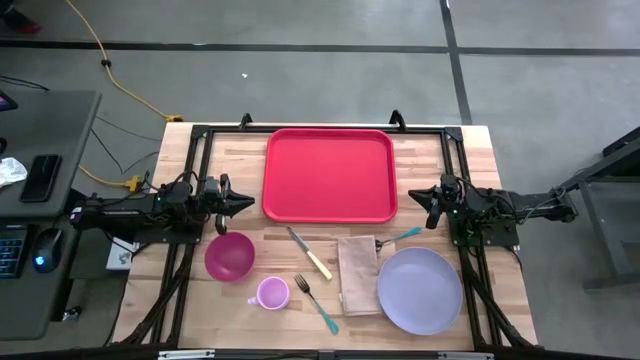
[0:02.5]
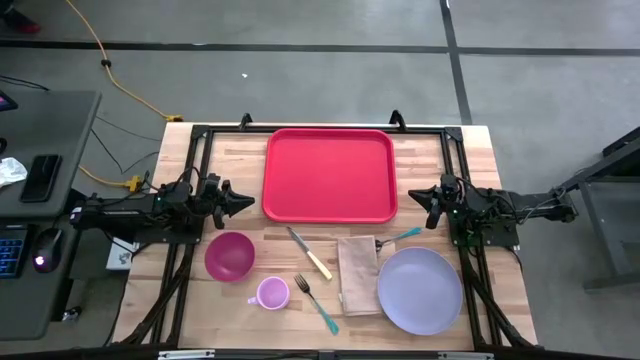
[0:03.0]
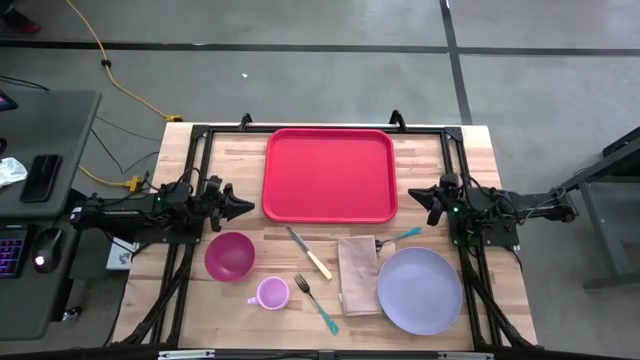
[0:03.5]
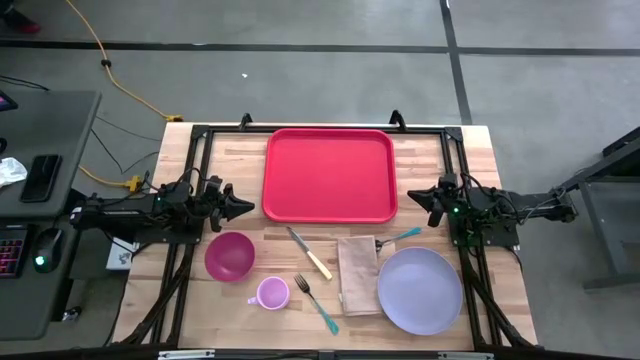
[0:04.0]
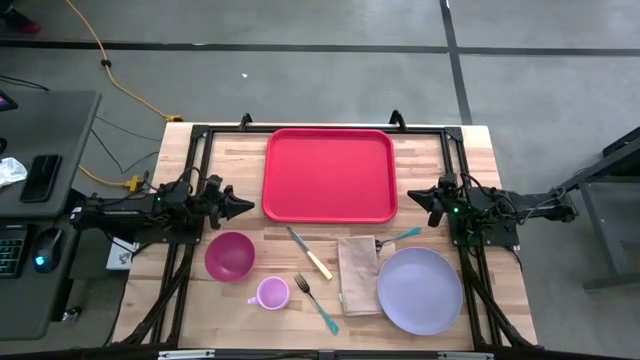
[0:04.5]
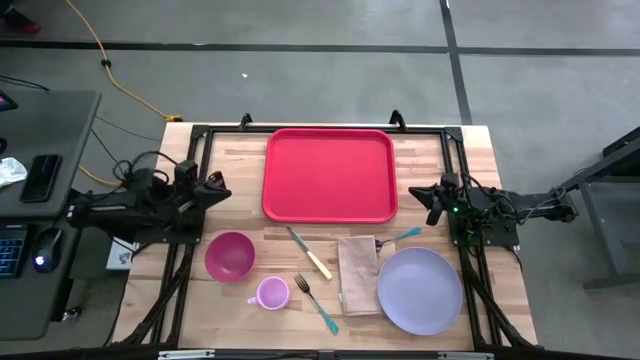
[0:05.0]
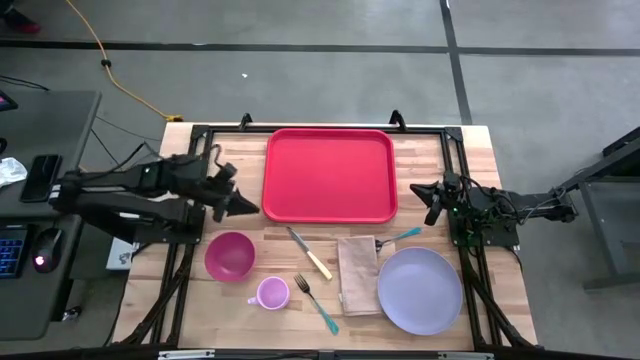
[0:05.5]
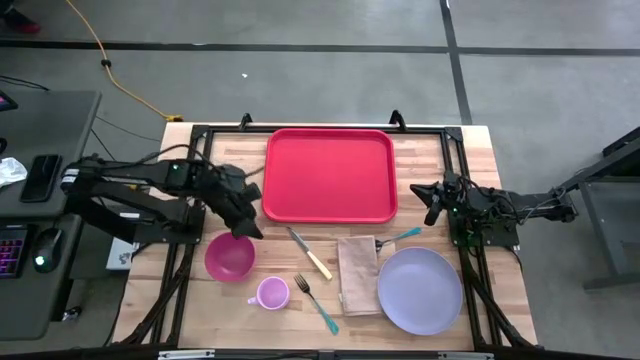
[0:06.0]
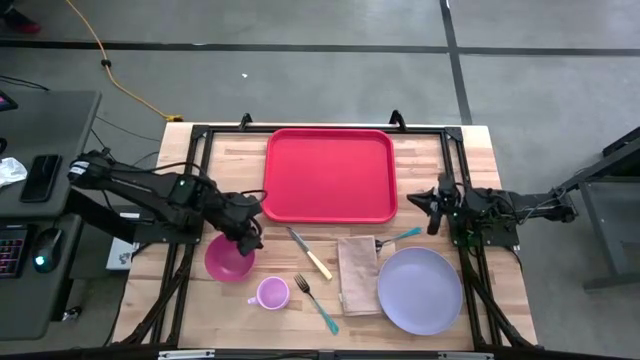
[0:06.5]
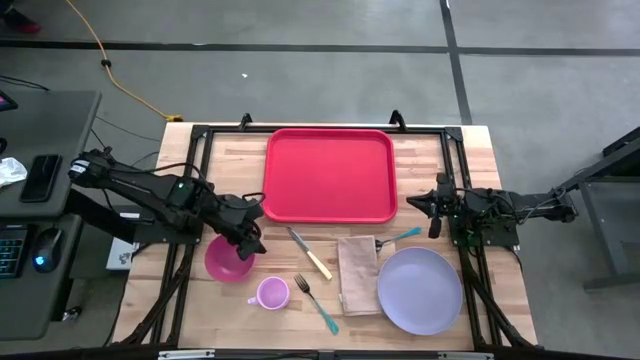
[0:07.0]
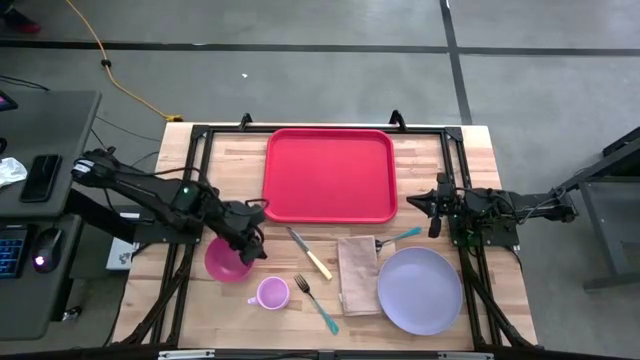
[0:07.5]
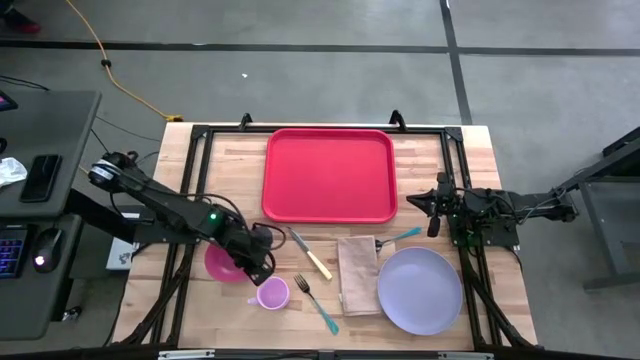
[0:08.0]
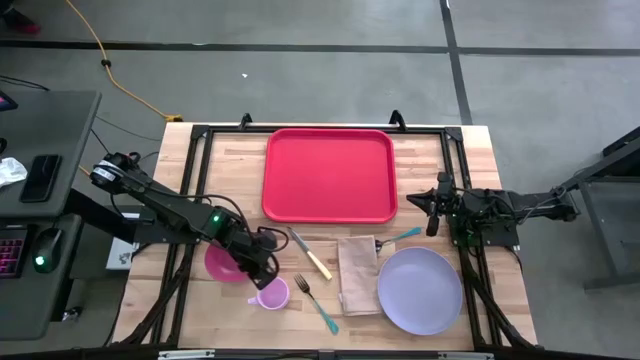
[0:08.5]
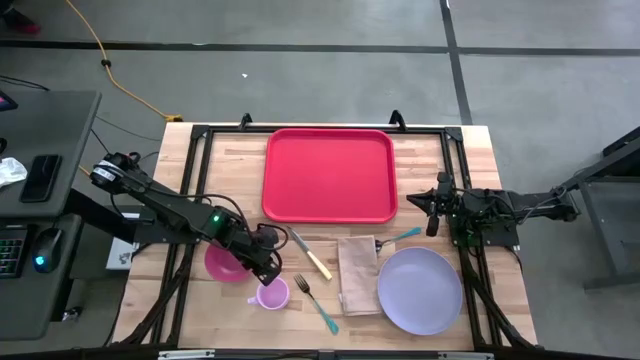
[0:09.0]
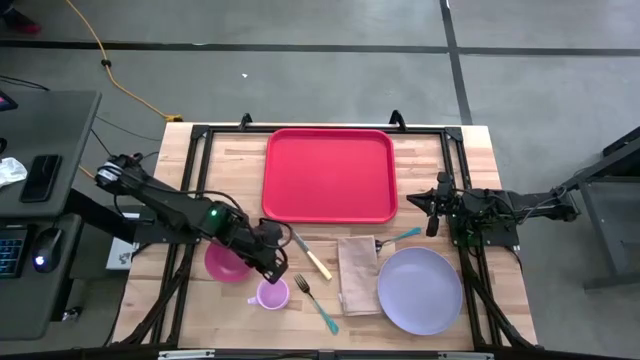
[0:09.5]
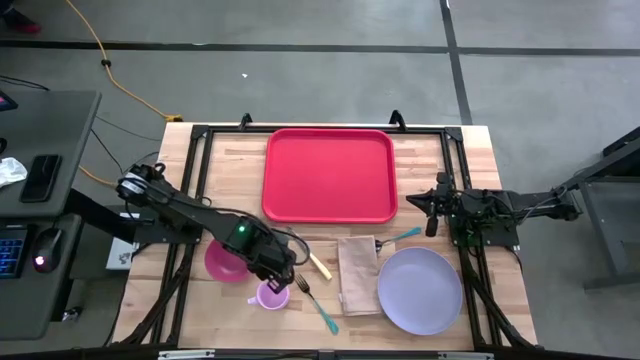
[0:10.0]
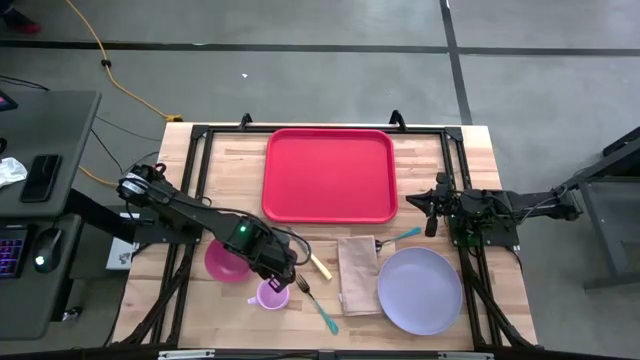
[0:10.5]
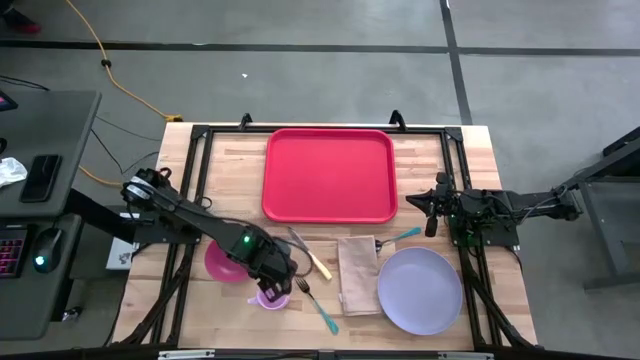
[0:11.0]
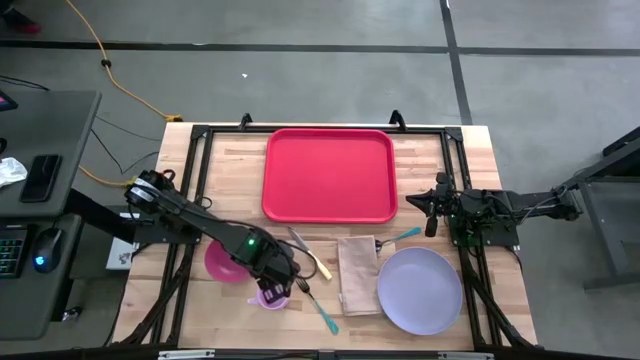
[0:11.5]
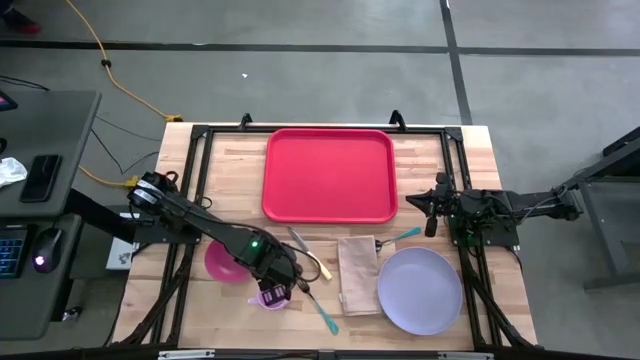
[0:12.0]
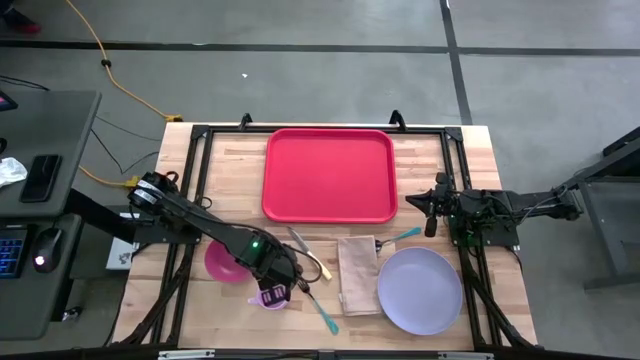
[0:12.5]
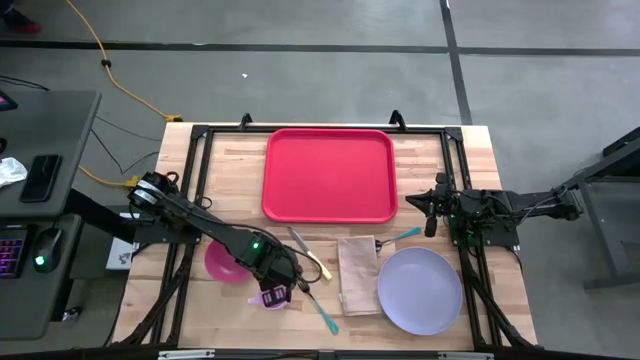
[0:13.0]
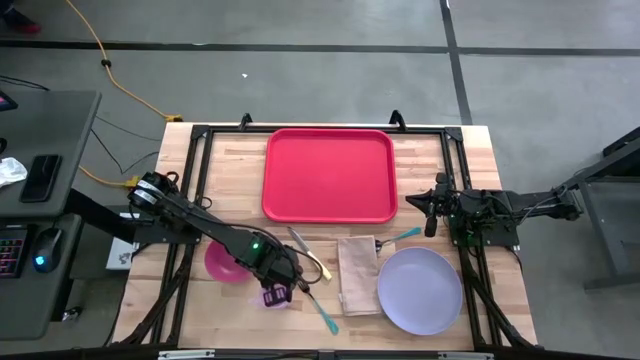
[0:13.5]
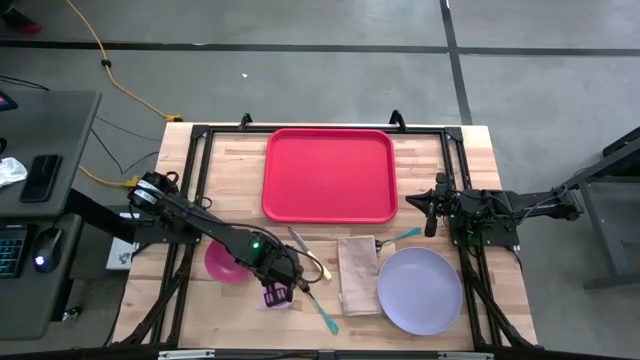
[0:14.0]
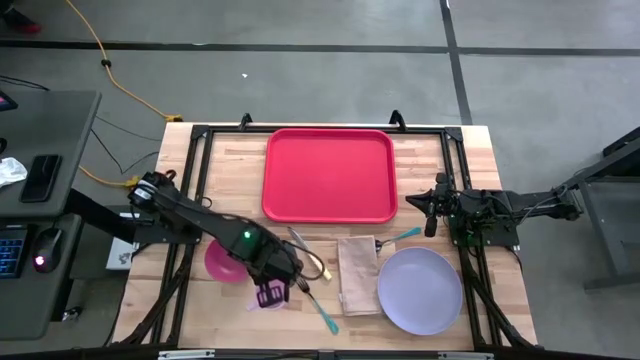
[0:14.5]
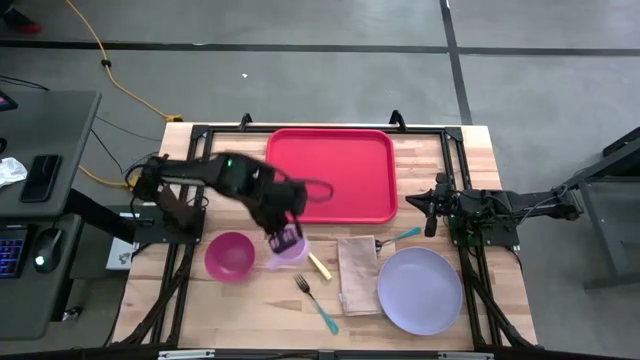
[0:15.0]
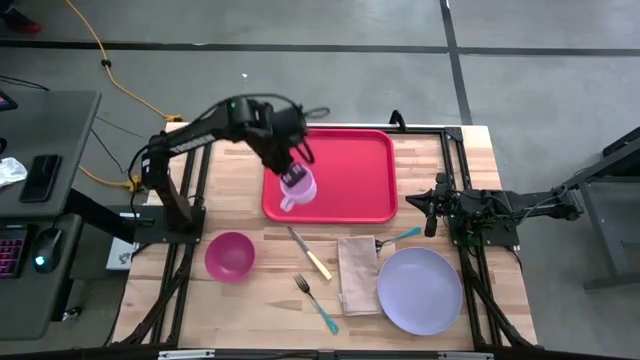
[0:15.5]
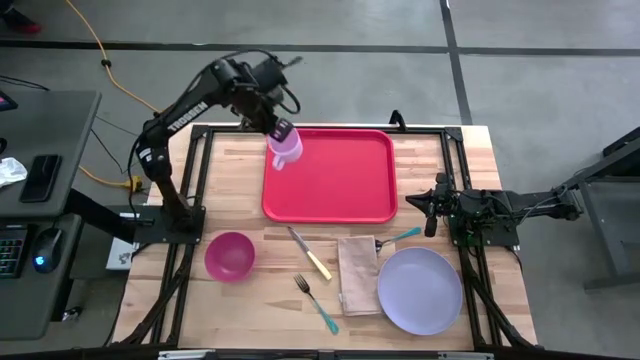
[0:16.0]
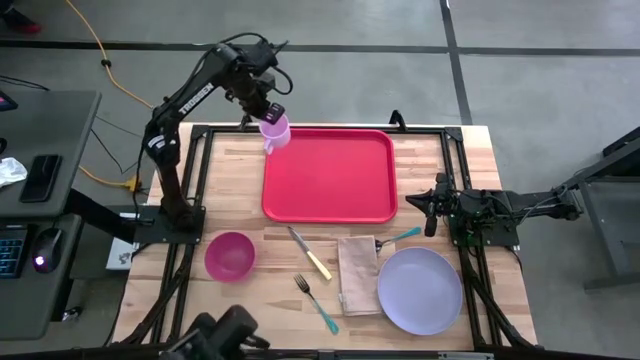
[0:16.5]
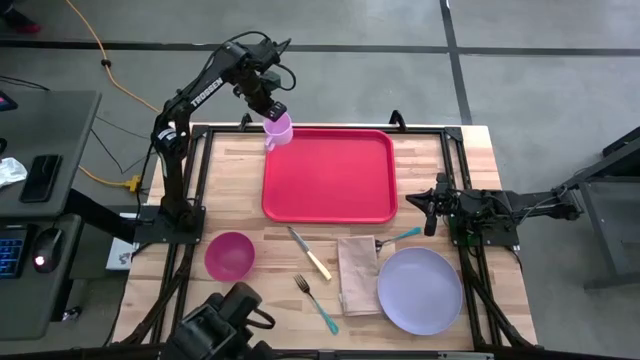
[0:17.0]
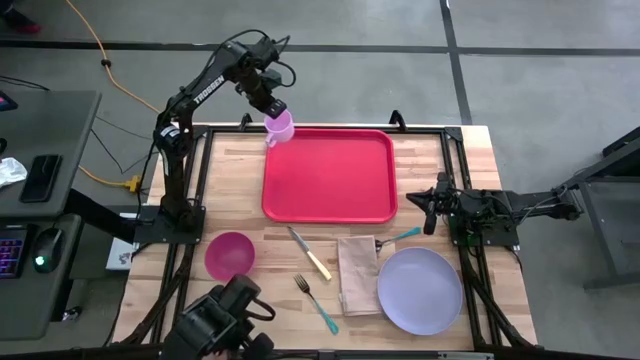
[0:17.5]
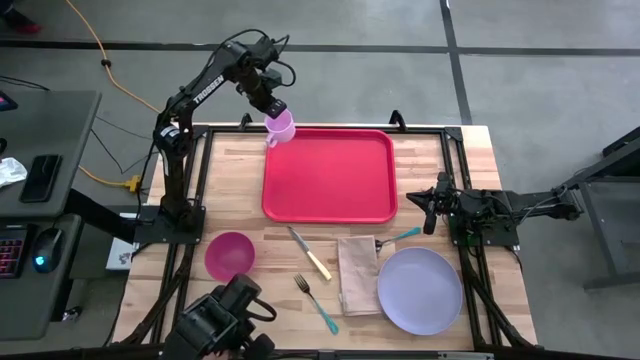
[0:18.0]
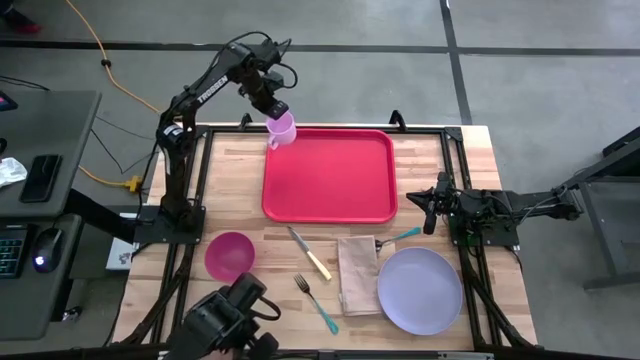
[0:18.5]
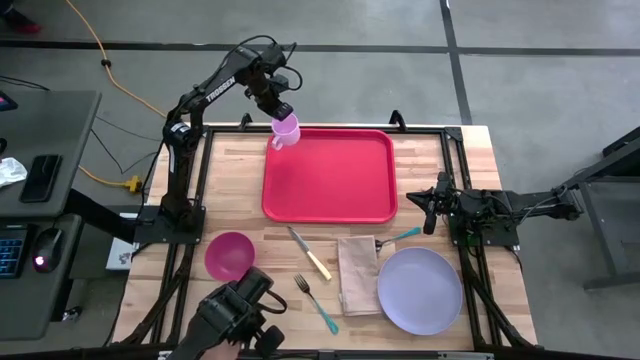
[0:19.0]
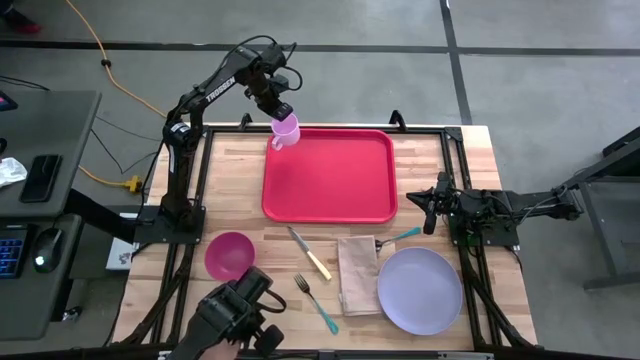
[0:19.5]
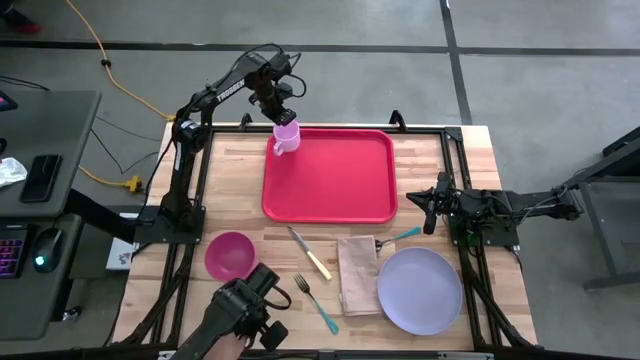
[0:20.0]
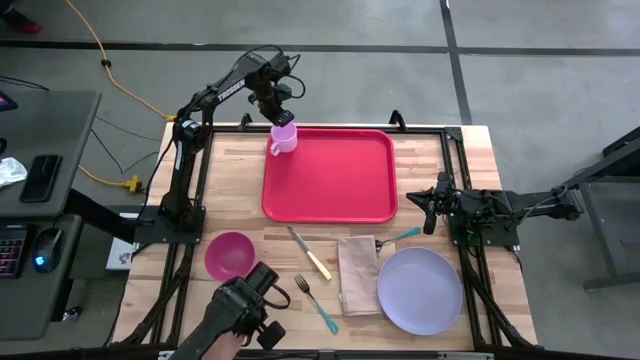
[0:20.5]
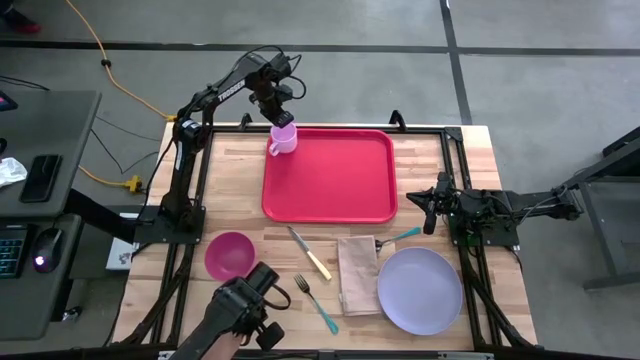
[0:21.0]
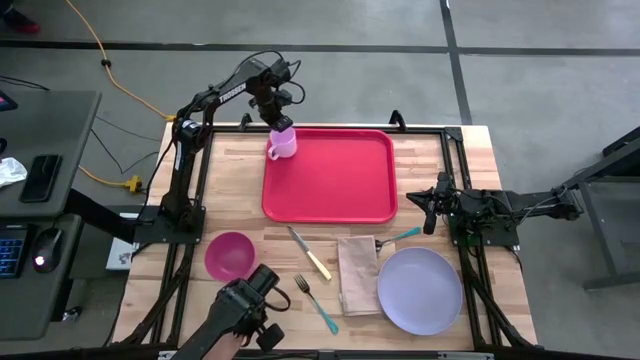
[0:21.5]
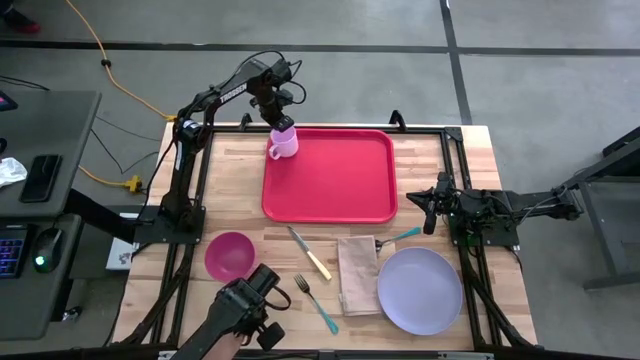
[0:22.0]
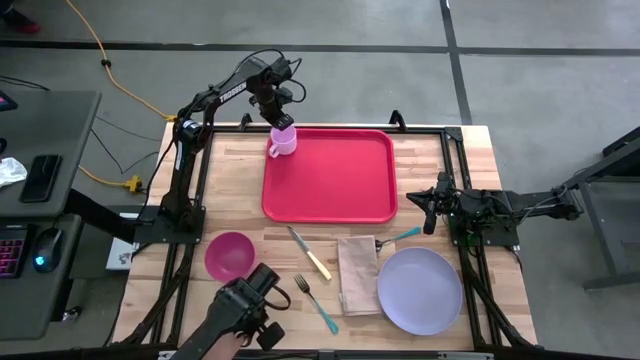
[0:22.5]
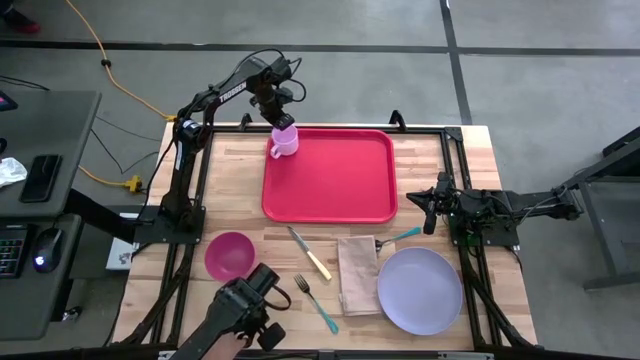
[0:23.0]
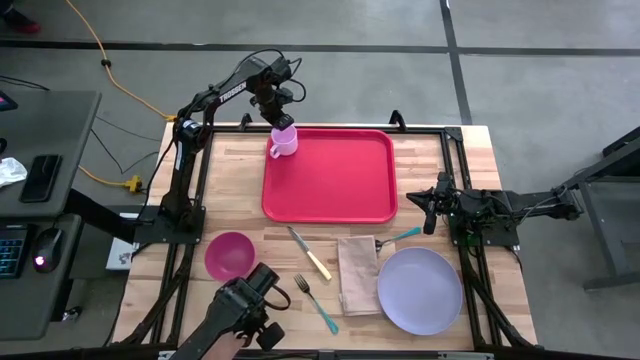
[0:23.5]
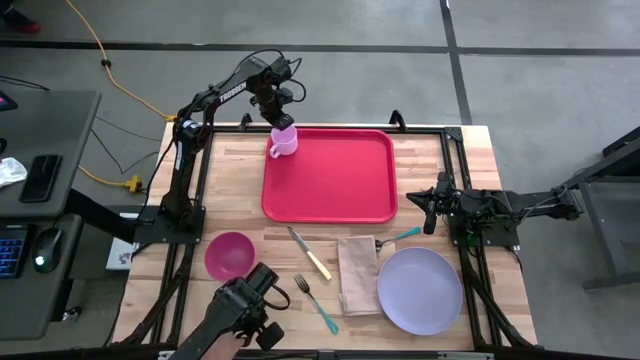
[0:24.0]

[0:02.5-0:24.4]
Task: Set up tray
Put the purple mug on the top left of the orange serving tray
